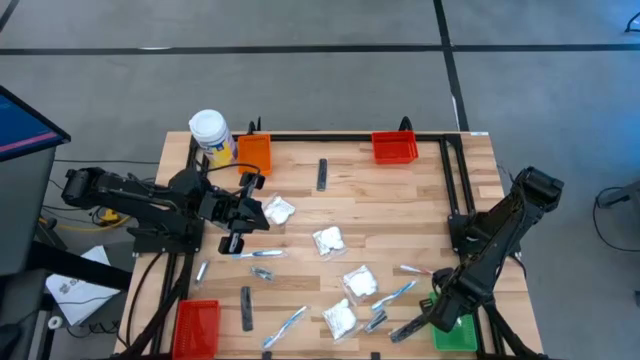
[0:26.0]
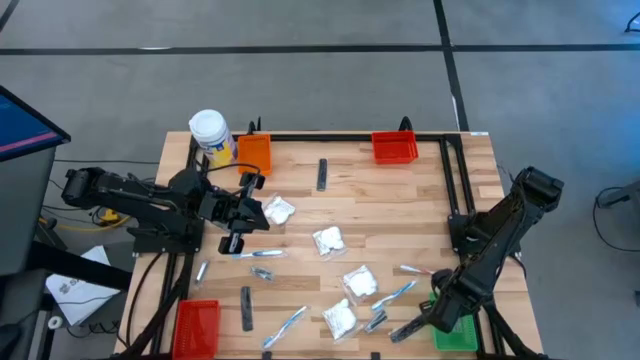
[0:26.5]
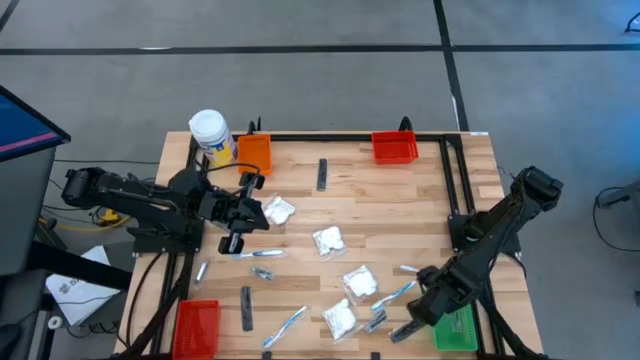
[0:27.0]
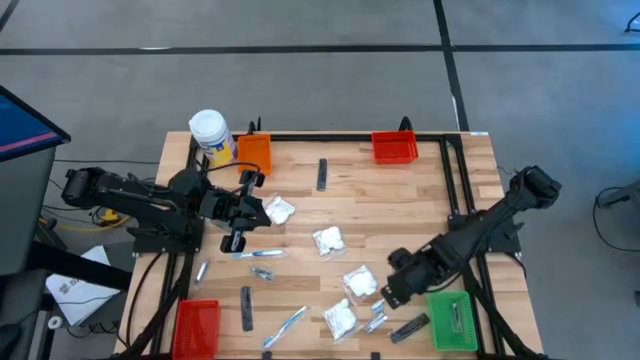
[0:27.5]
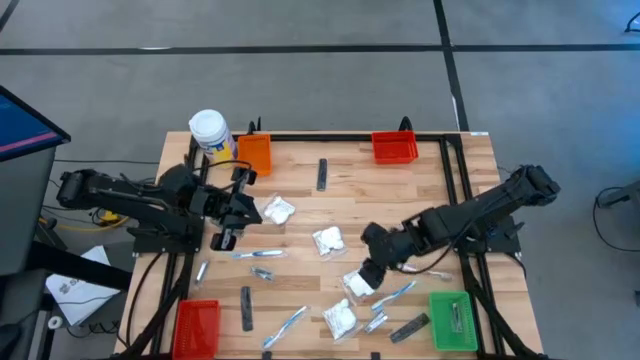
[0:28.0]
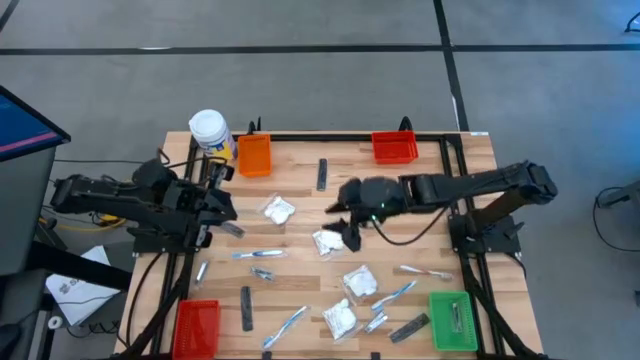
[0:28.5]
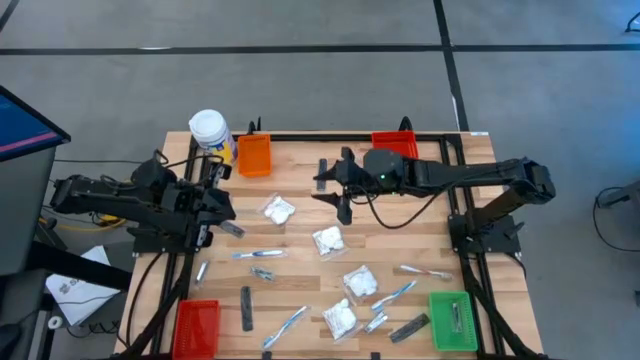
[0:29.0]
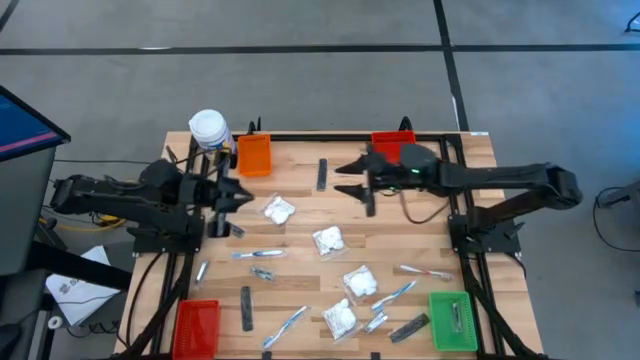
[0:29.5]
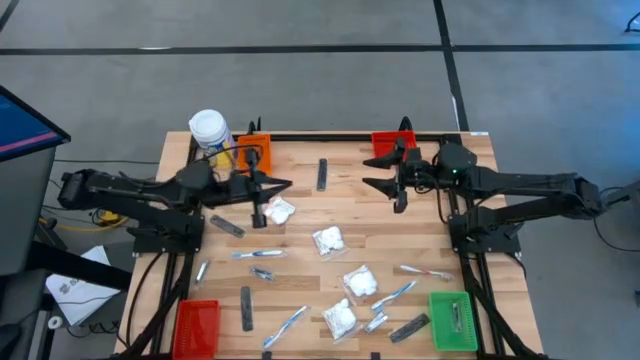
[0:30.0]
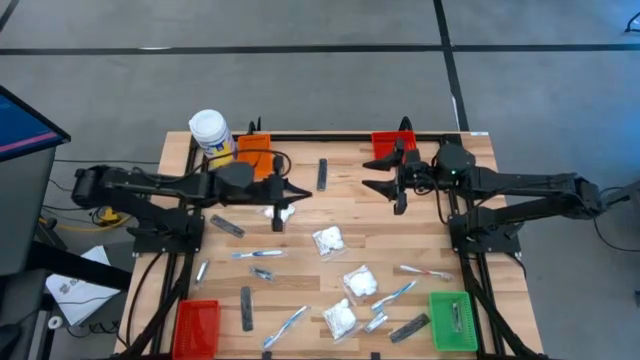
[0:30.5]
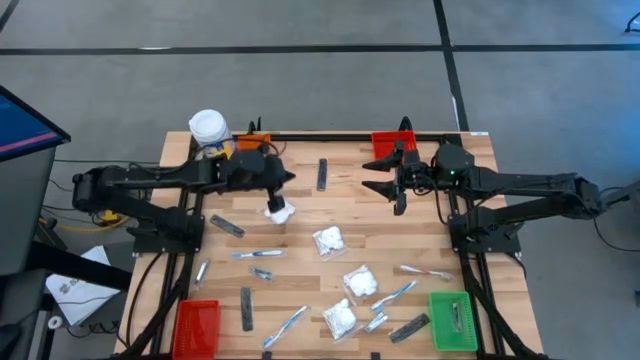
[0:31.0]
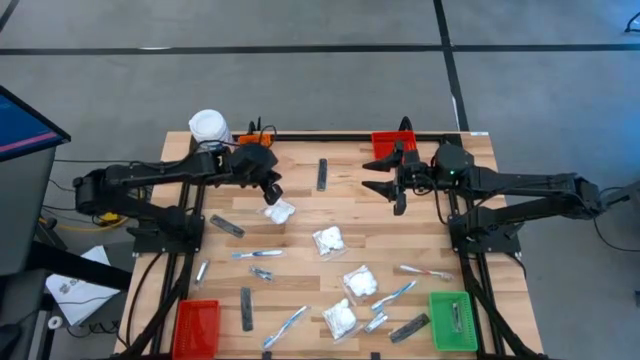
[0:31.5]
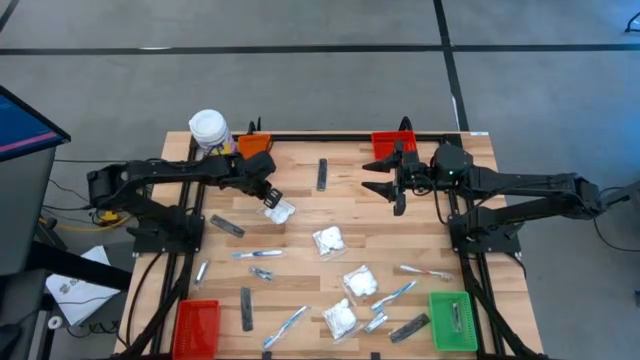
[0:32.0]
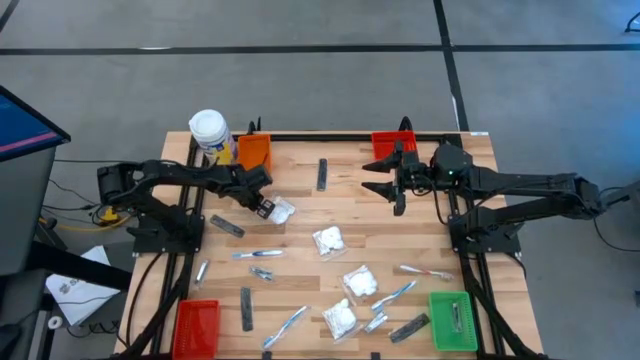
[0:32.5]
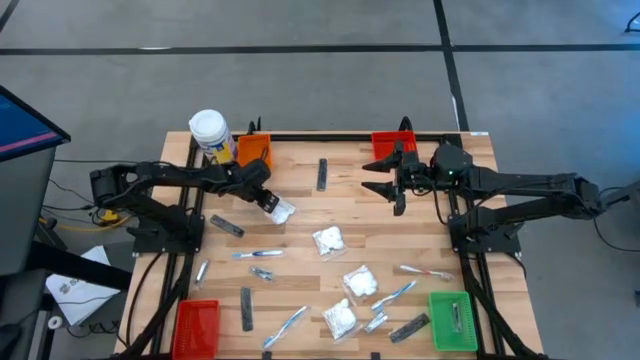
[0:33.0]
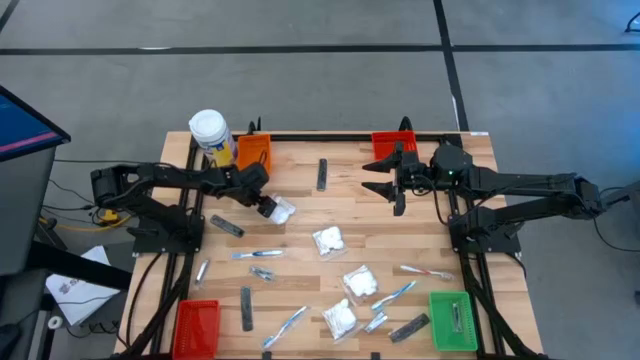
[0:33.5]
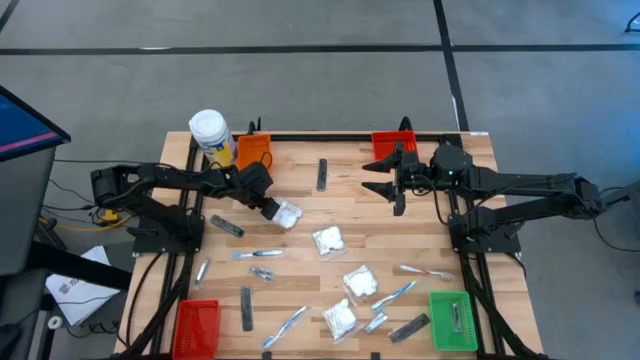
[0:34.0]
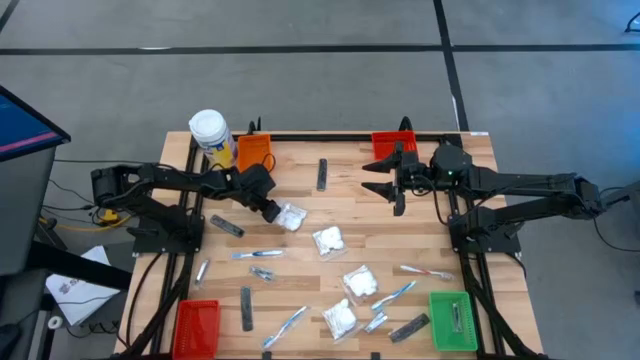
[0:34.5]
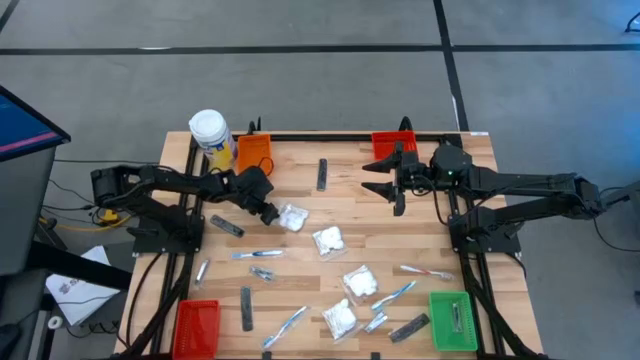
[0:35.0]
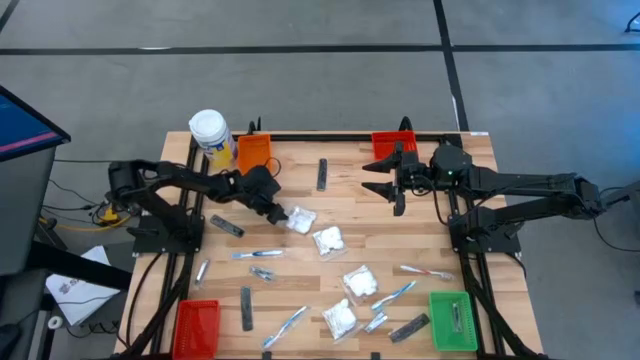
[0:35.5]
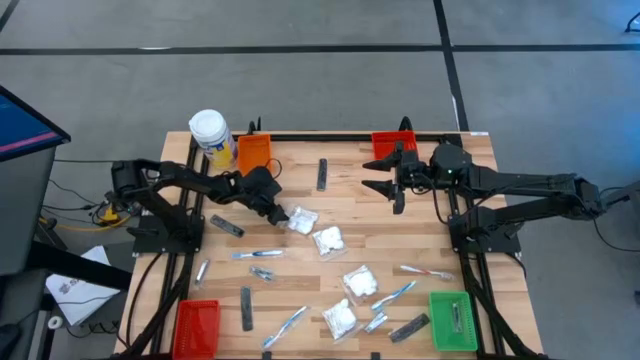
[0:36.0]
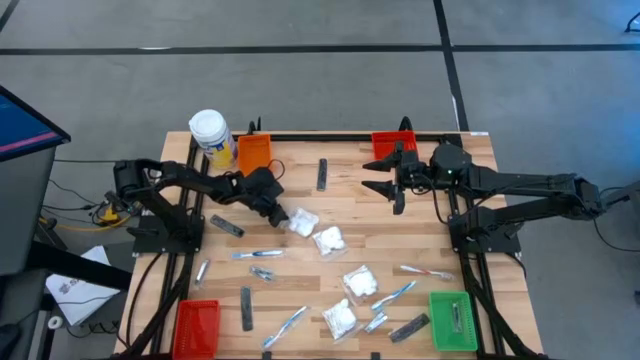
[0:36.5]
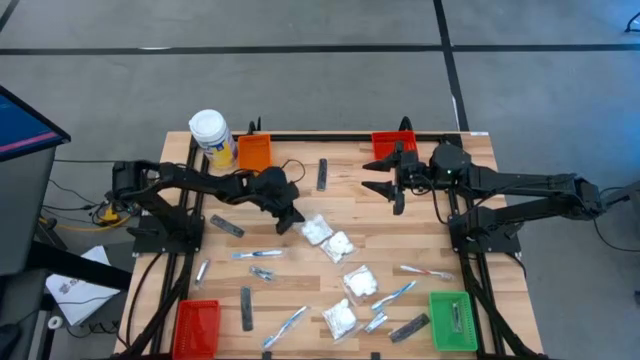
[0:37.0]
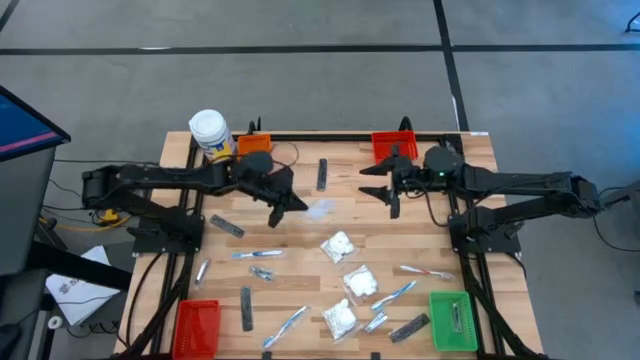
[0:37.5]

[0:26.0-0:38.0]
Task: Pick & Place Travel size toiletries
Put the cotton pack into the top red bin

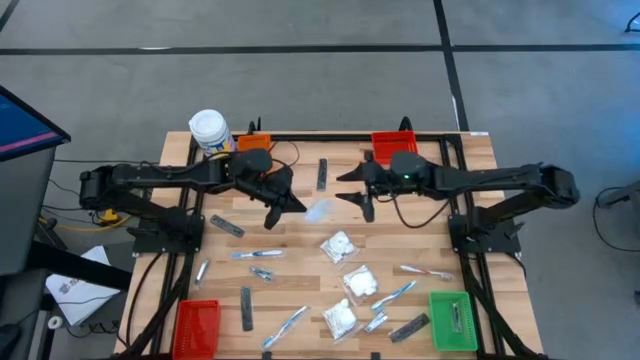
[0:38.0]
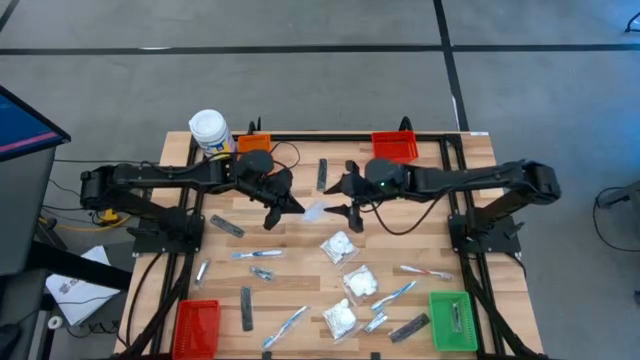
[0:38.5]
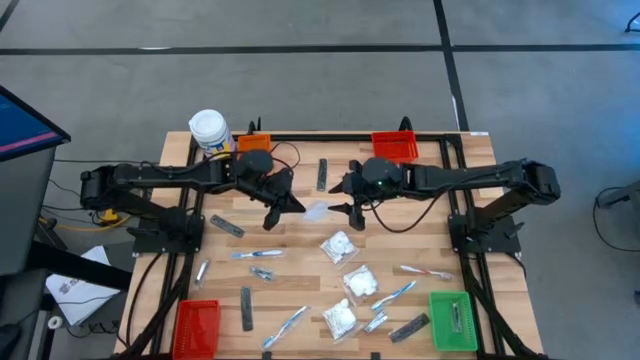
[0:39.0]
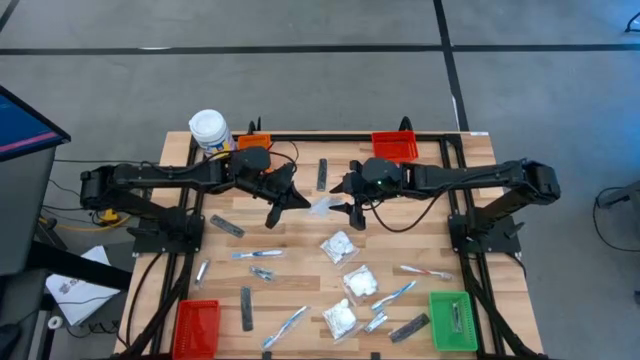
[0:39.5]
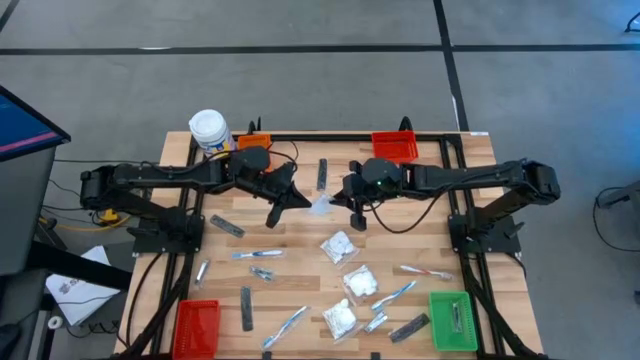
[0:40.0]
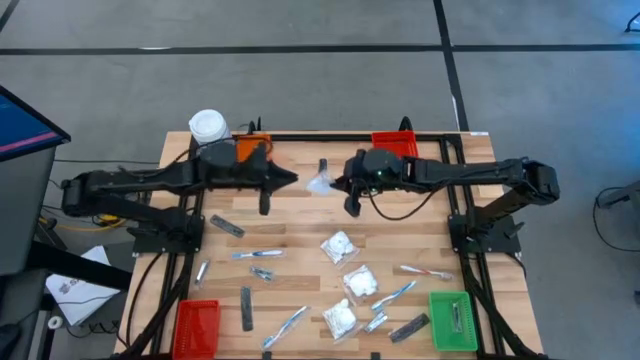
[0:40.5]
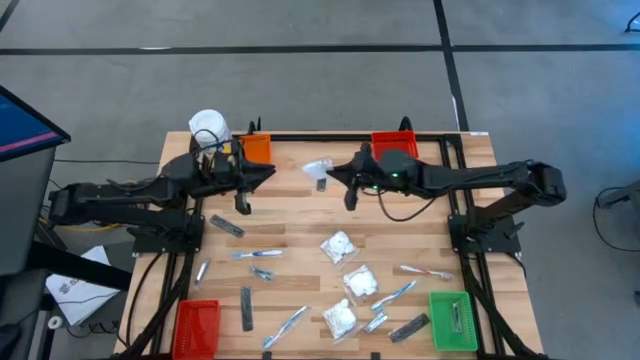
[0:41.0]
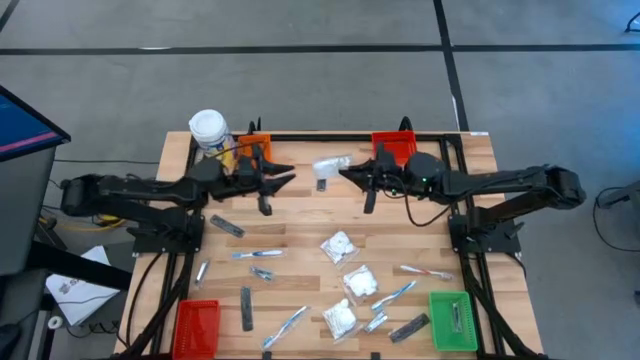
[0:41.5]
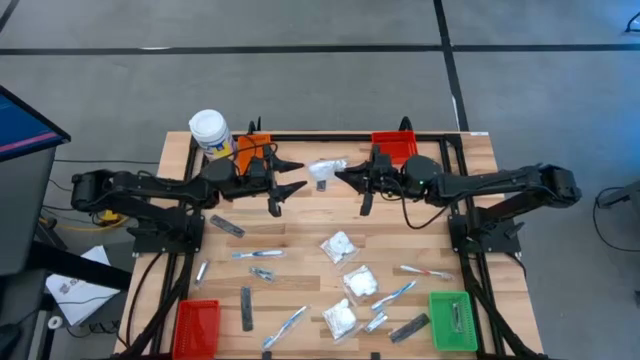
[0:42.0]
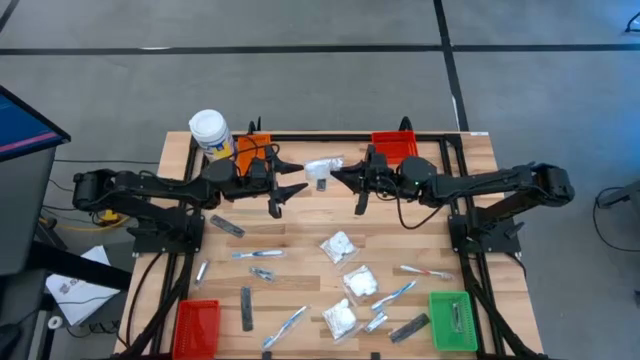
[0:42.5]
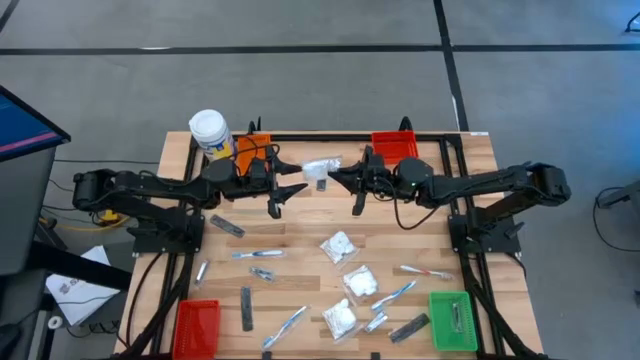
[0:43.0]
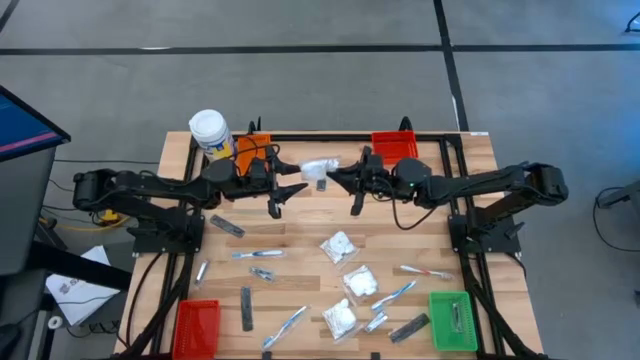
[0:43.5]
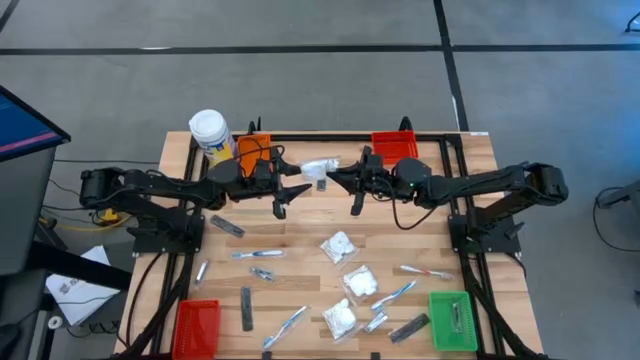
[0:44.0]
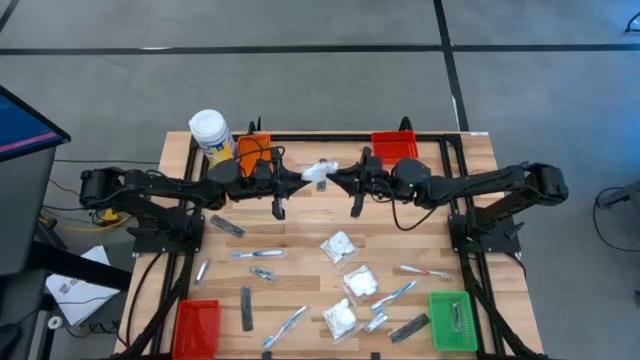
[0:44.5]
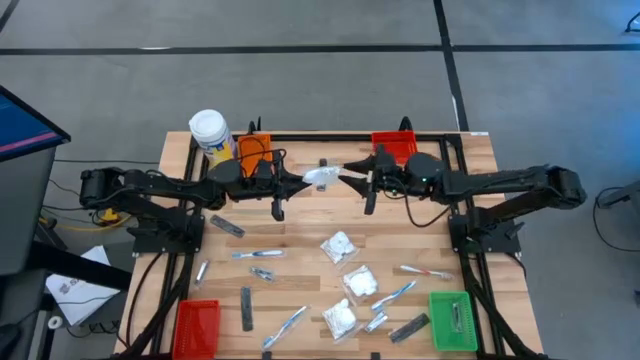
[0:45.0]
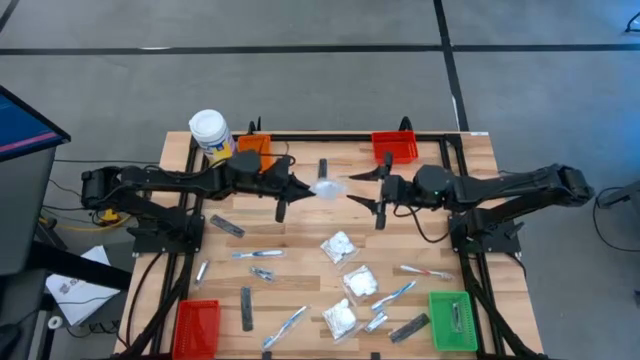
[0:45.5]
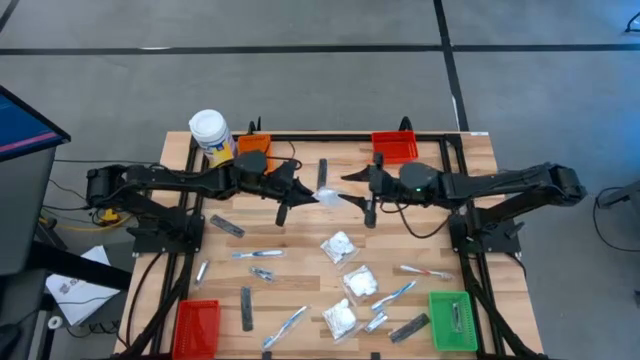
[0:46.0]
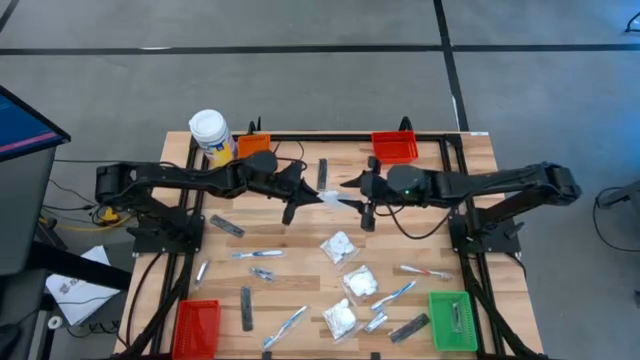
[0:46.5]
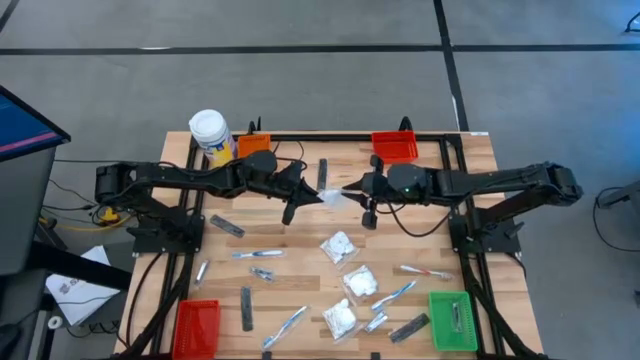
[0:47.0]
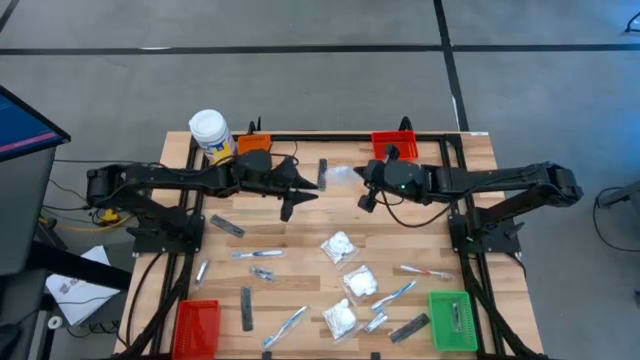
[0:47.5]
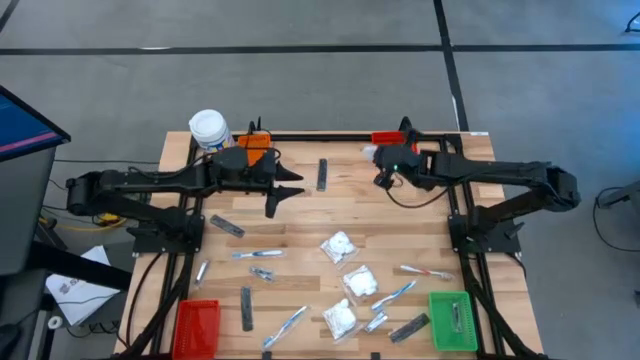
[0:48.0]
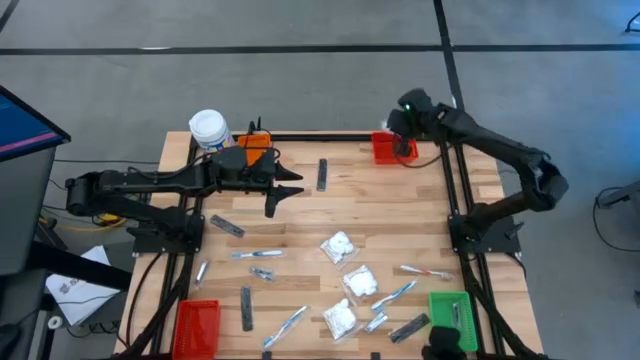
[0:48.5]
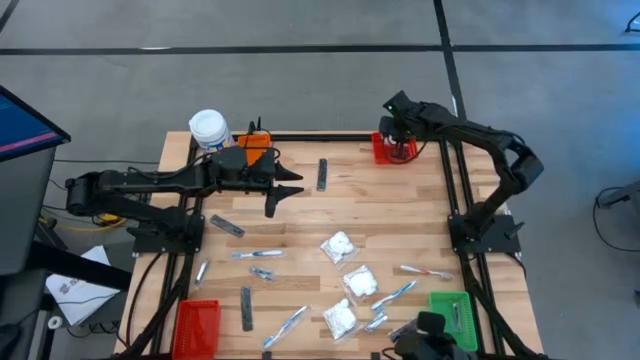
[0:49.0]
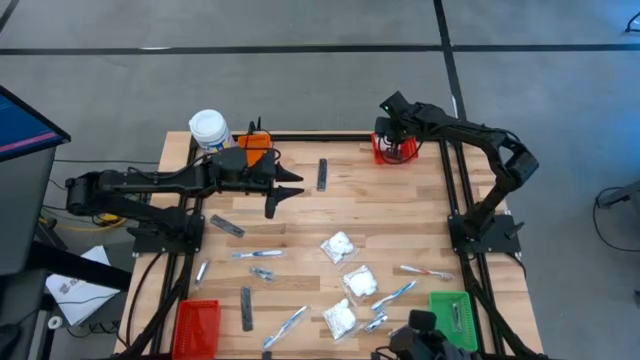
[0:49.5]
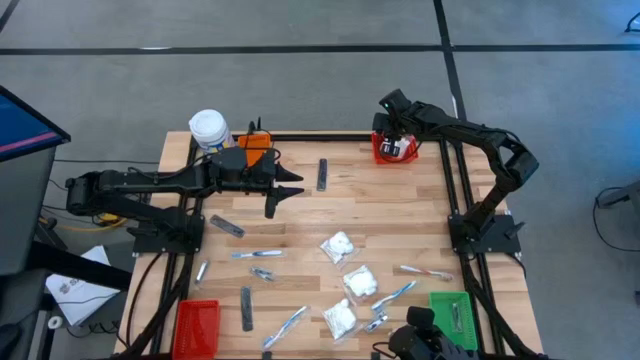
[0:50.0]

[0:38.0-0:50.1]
Put the cotton pack into the top red bin
